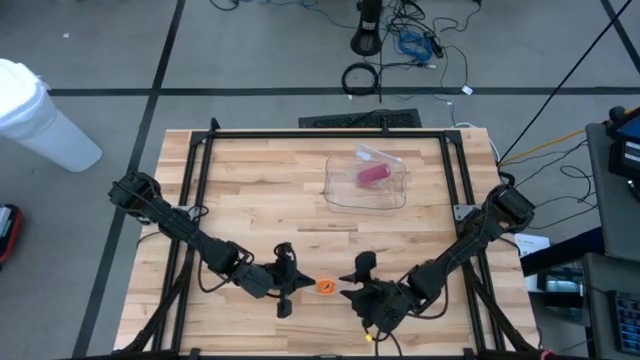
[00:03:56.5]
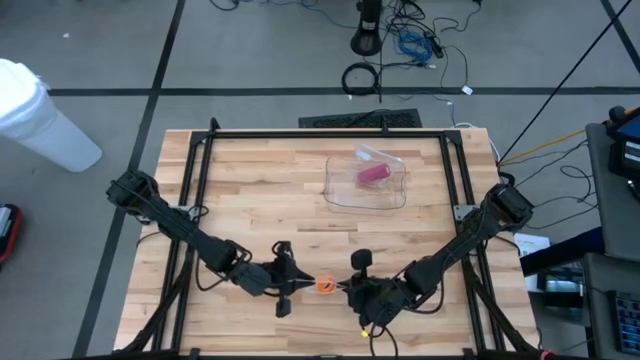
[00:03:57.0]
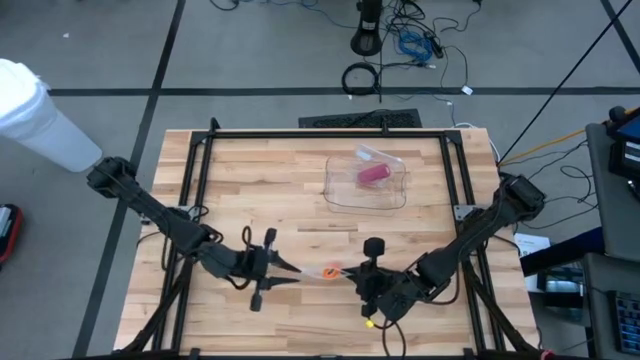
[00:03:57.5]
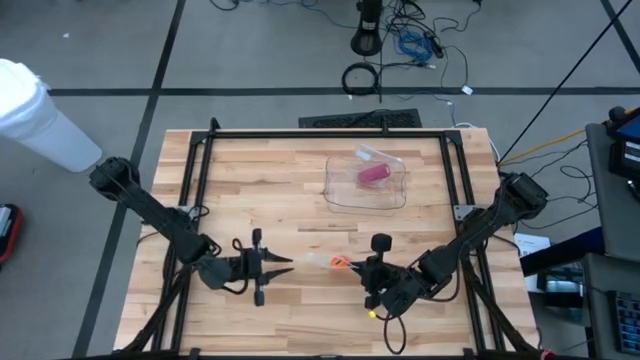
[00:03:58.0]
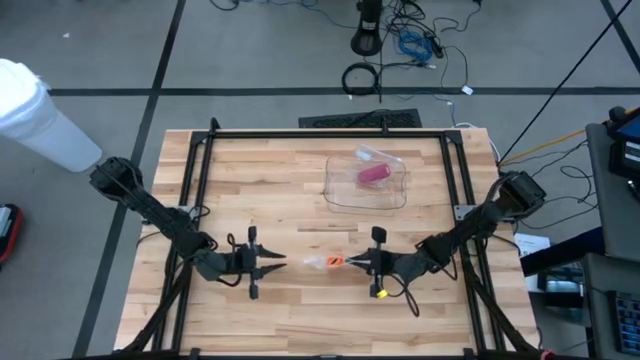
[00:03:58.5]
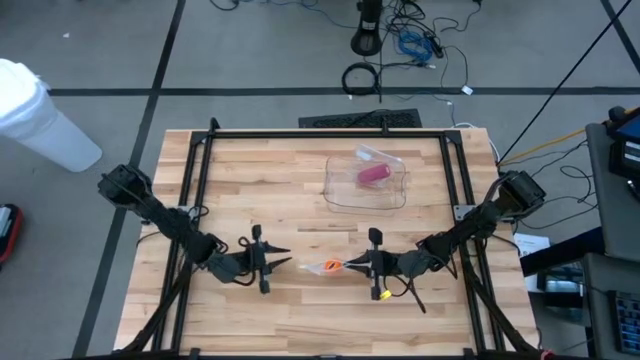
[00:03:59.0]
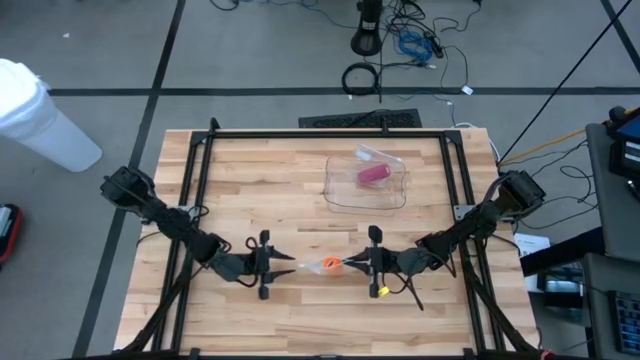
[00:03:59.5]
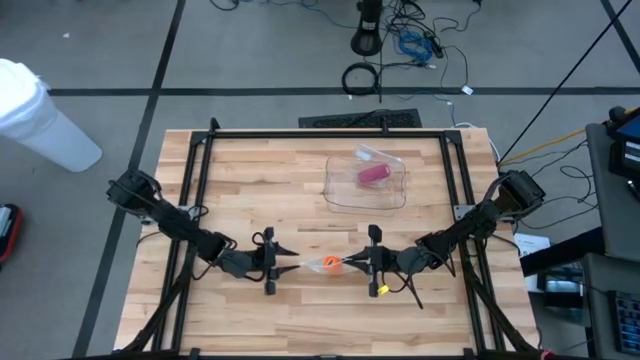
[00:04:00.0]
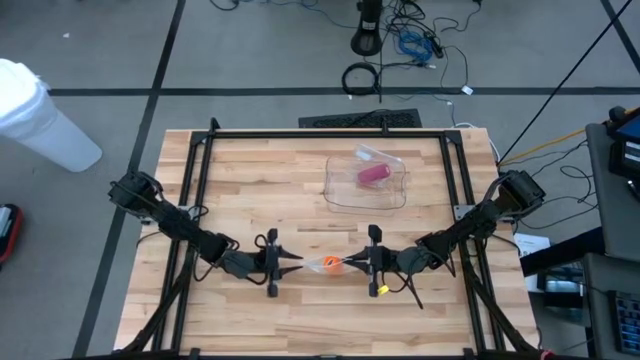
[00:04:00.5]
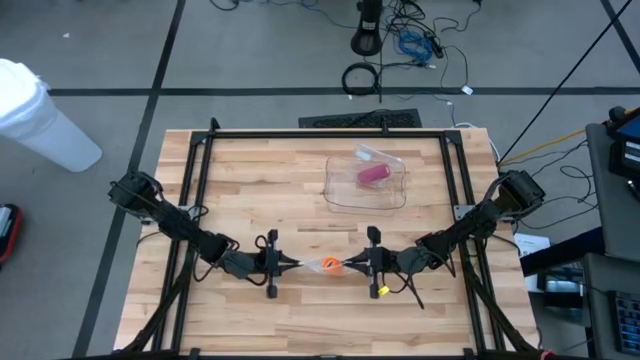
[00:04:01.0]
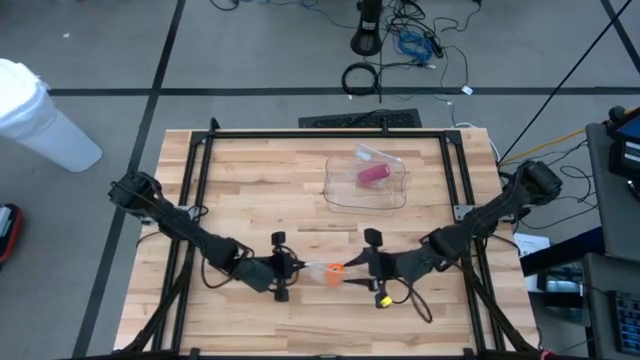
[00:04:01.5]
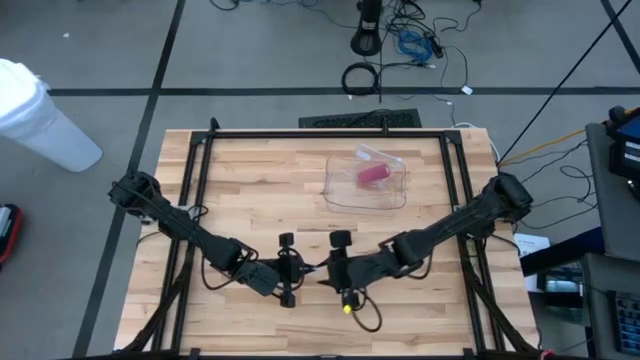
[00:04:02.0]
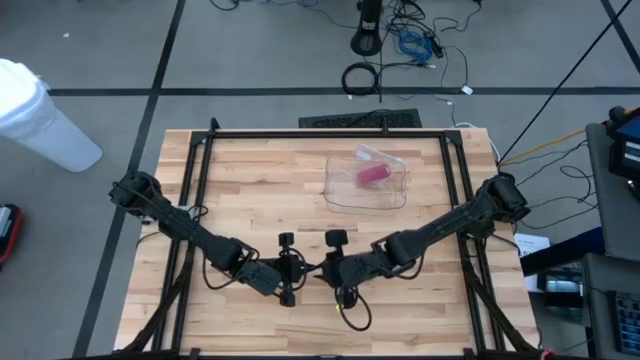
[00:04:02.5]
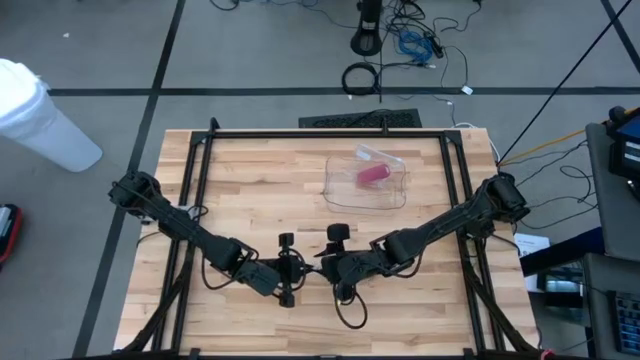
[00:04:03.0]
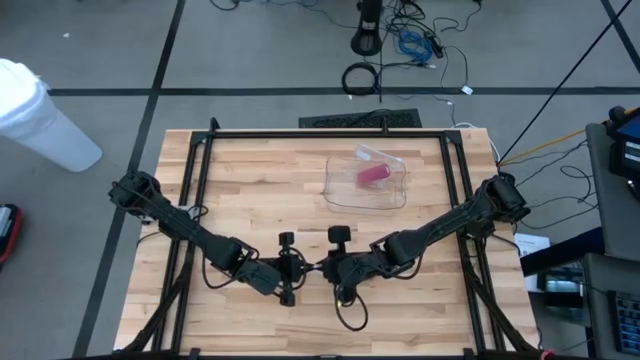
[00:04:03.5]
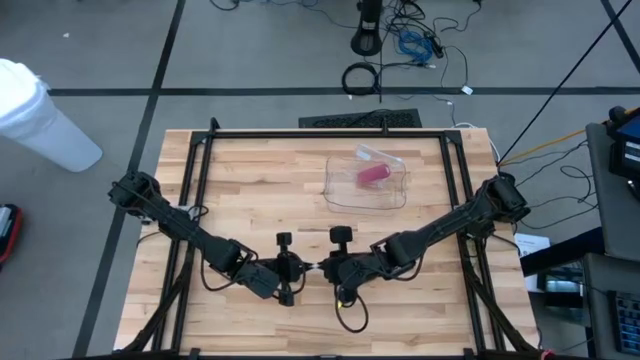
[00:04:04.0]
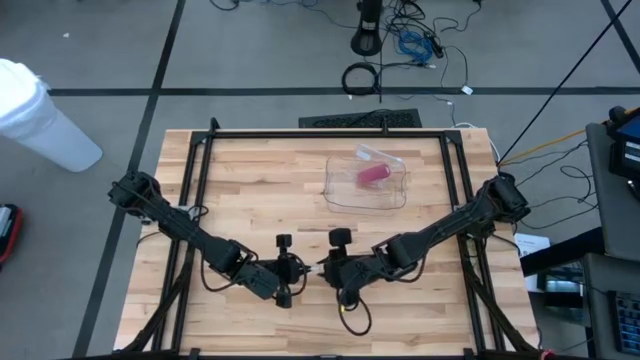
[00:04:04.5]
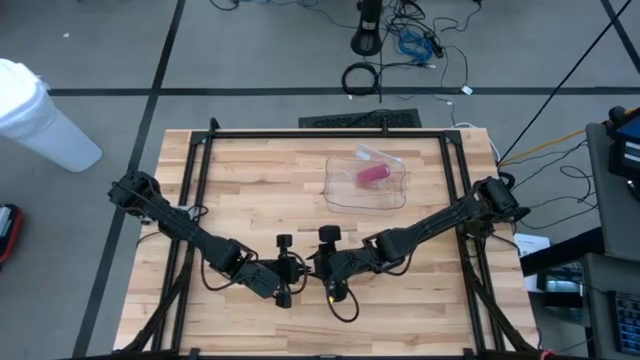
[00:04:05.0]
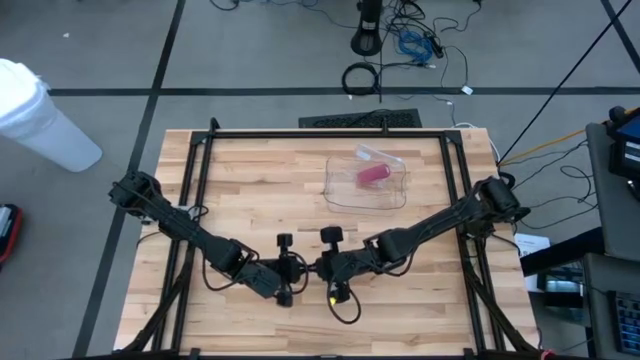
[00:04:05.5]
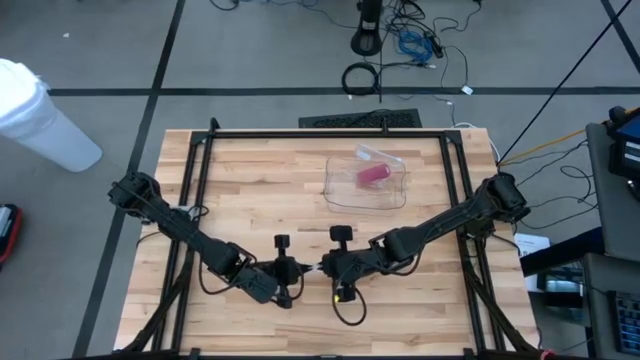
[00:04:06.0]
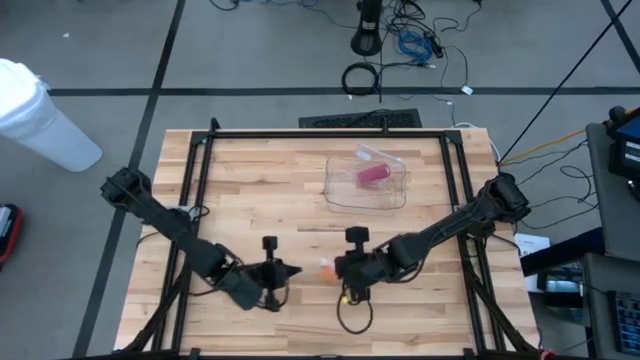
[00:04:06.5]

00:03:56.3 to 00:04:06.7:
Task: Roll bandage
Close the transparent zip bag

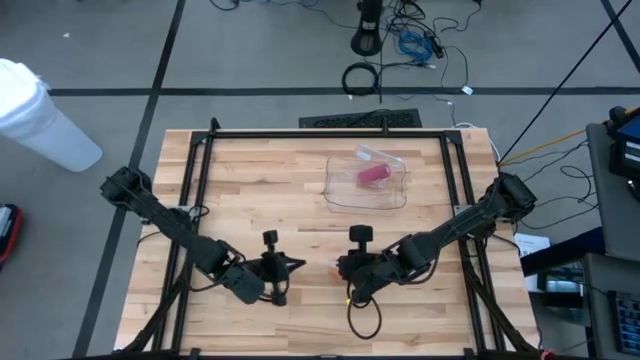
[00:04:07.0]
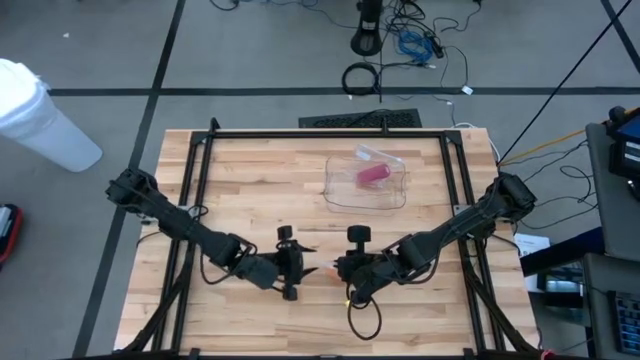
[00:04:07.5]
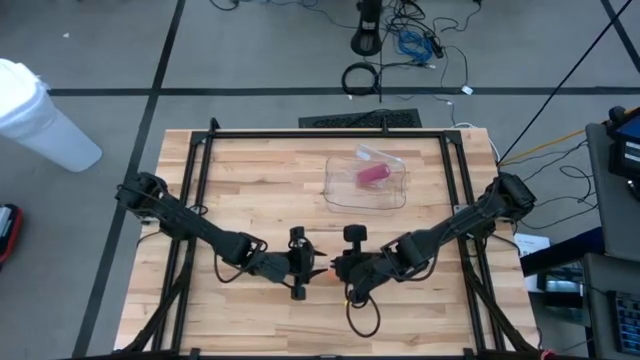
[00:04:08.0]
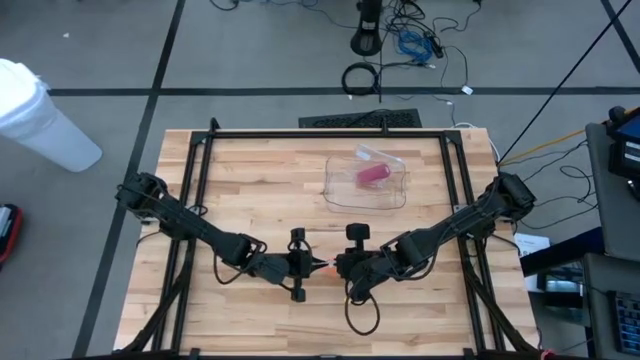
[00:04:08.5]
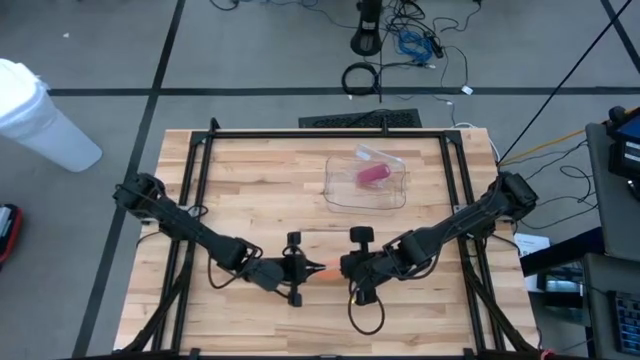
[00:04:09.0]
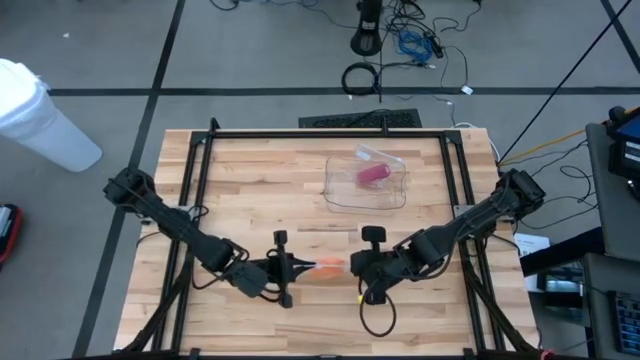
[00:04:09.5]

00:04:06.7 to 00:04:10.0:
Close the transparent zip bag

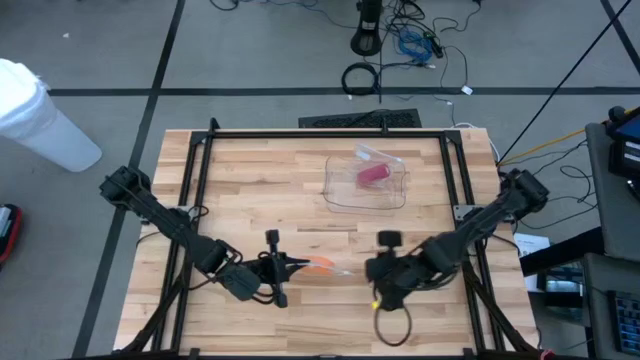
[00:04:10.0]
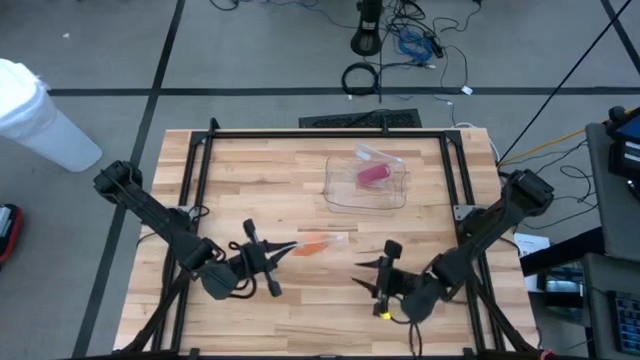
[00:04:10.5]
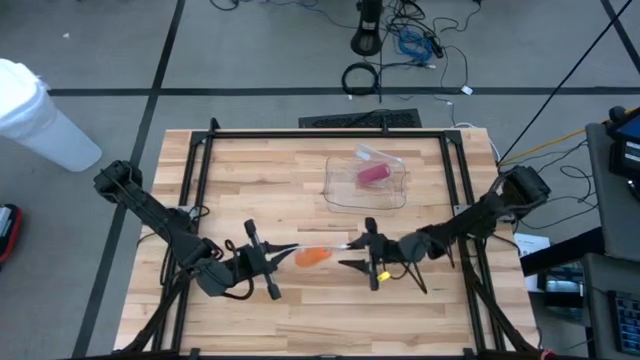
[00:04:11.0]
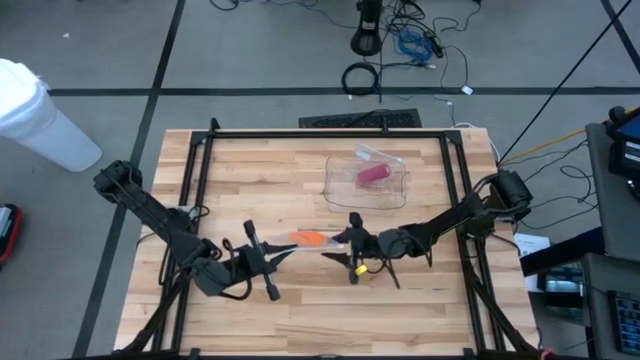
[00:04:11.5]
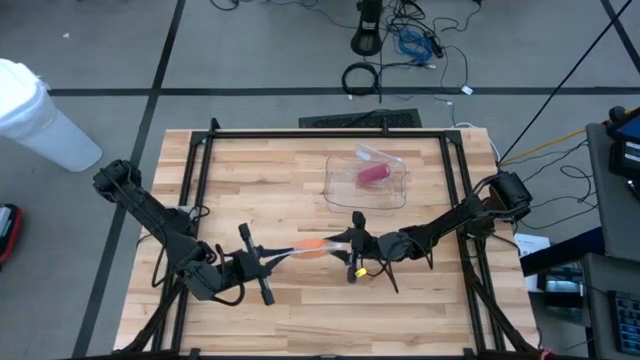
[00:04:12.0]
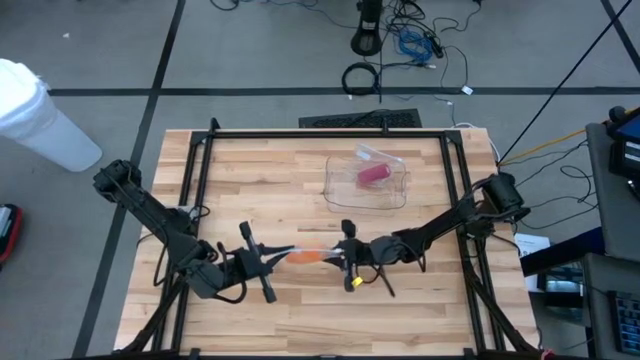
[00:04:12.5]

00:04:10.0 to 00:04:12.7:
Adjust the transparent zip bag with the bandage

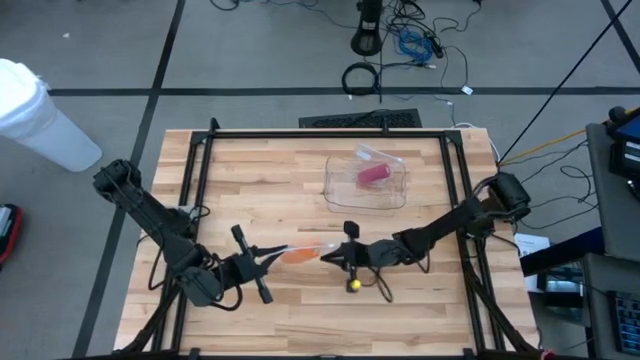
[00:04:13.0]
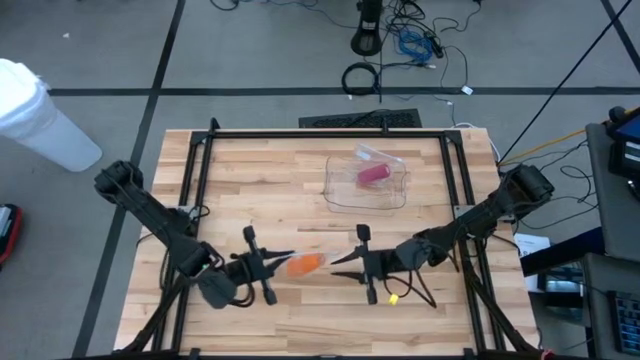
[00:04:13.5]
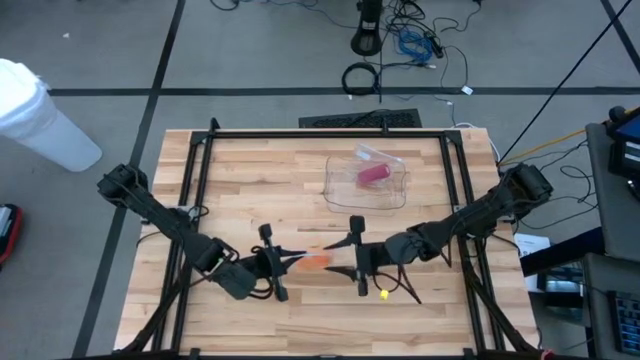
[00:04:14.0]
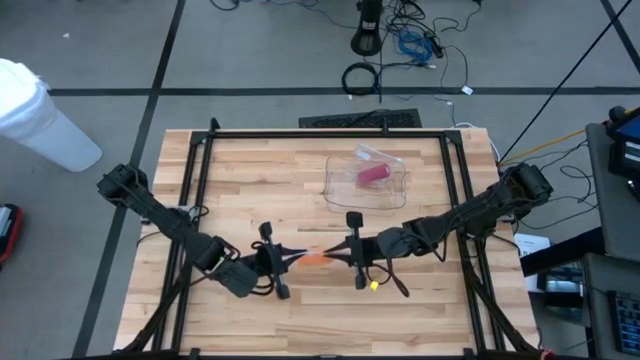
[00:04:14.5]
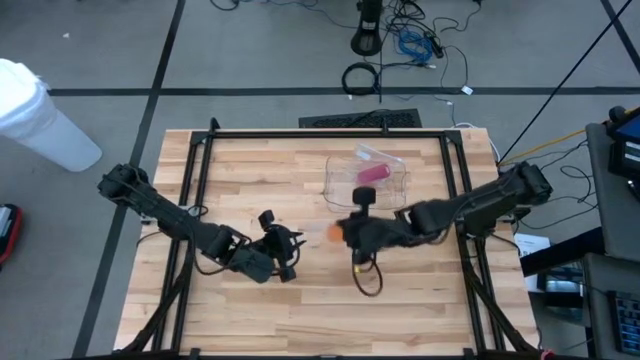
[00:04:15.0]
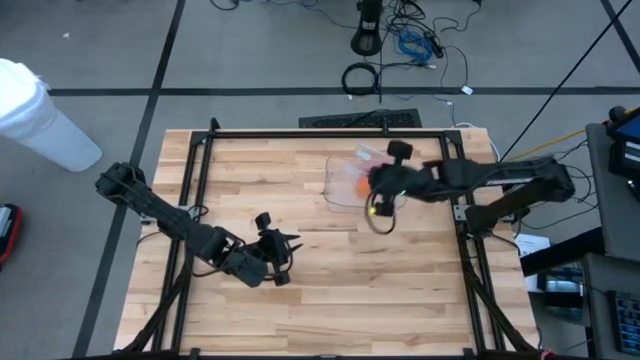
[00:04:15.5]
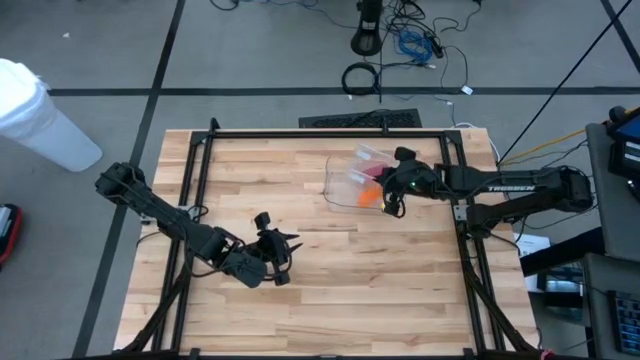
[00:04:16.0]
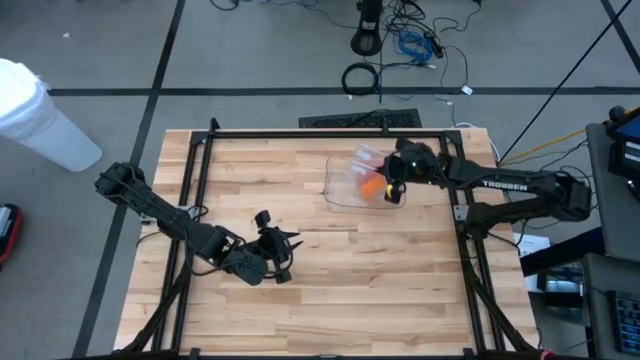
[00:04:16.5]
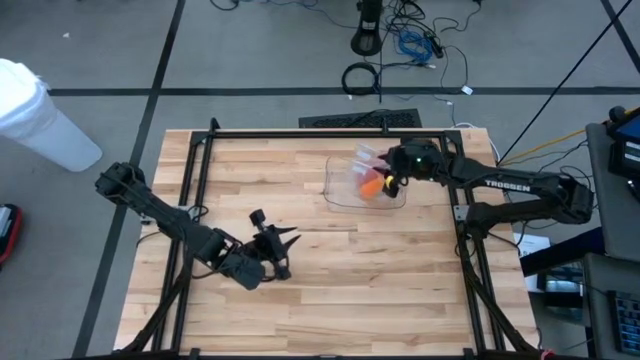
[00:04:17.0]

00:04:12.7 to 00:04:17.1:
Put the transparent zip bag with the bandage into the transparent bin

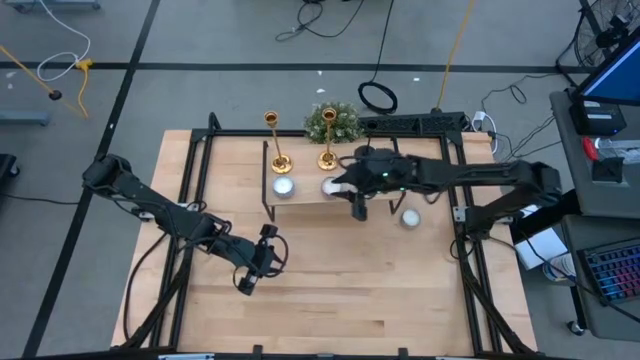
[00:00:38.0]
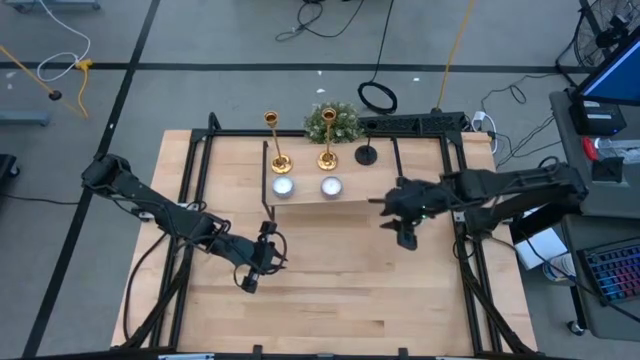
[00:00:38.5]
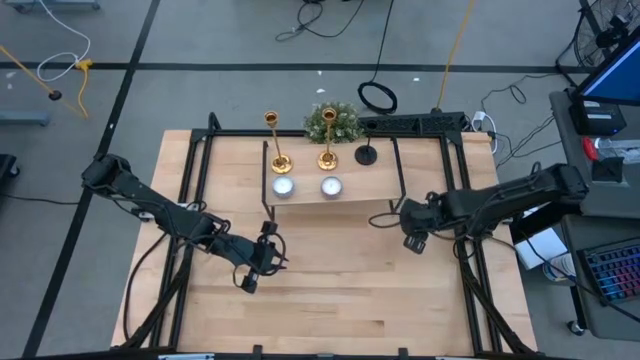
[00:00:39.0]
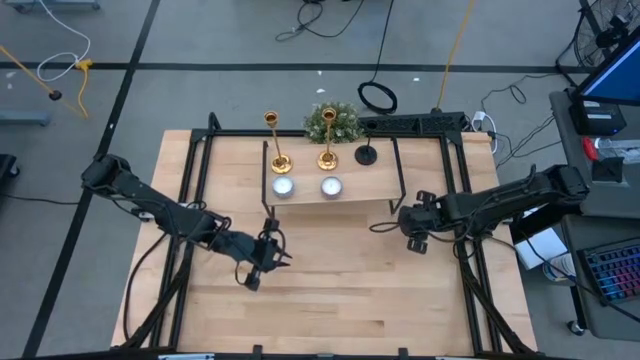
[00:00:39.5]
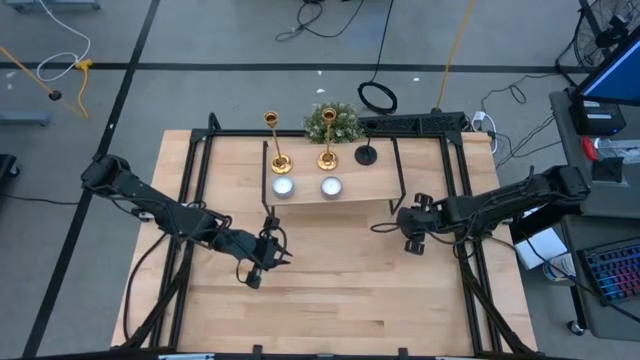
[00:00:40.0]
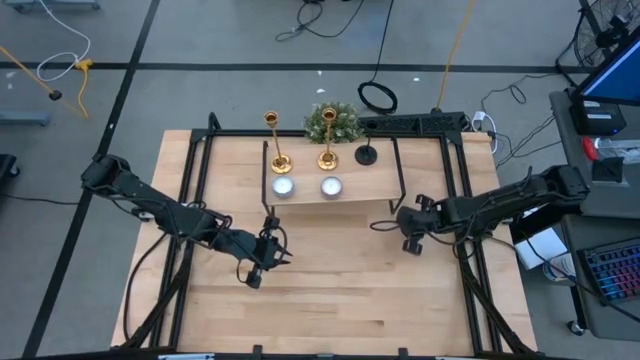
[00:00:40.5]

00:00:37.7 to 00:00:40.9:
Task: Pick & Place candle stick holders
Align the blue scented candle with the pink scented candle on the shelf
